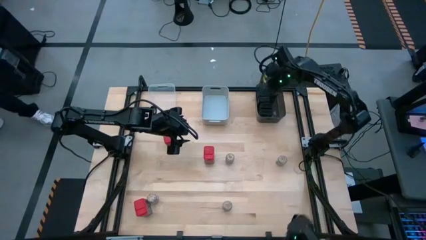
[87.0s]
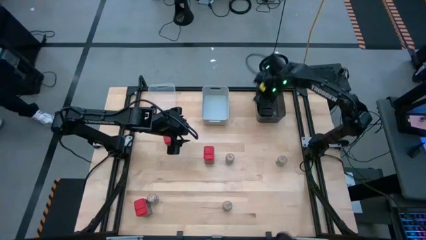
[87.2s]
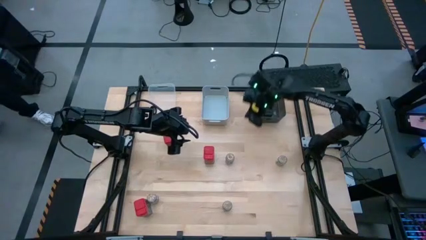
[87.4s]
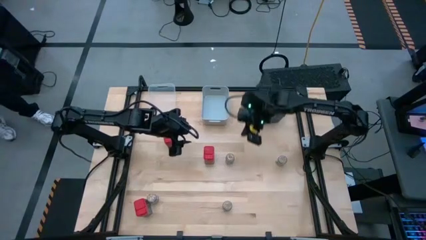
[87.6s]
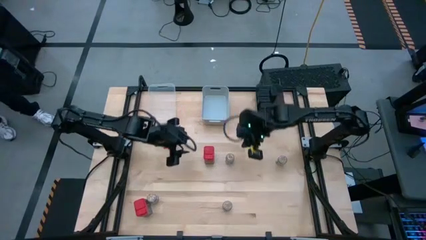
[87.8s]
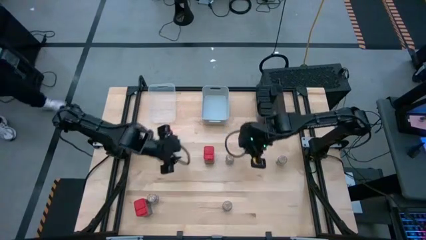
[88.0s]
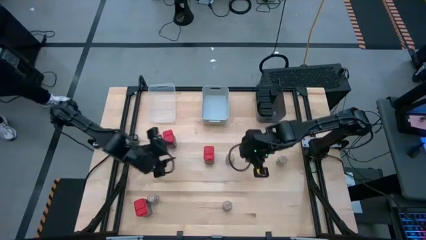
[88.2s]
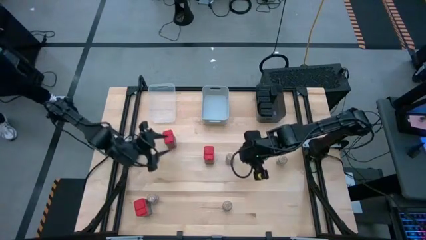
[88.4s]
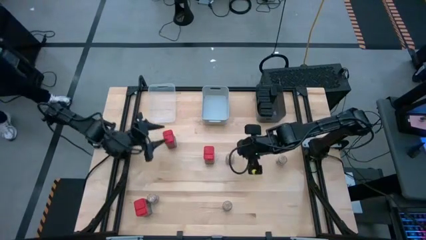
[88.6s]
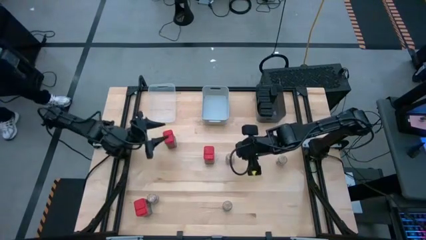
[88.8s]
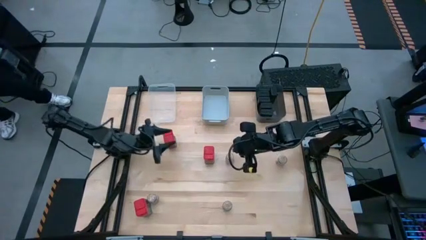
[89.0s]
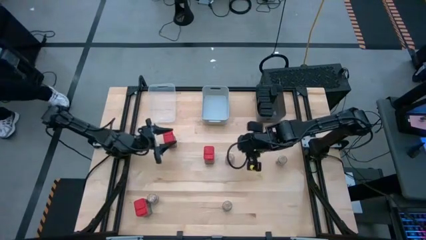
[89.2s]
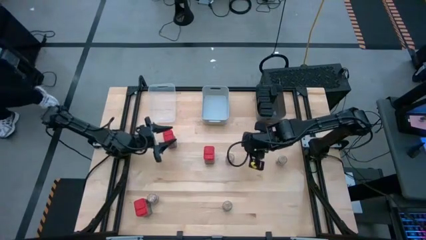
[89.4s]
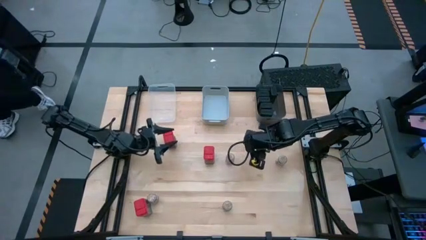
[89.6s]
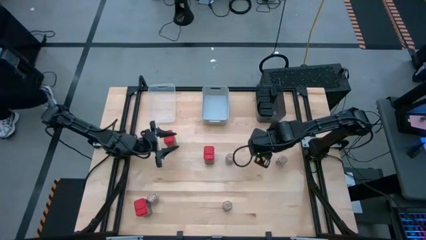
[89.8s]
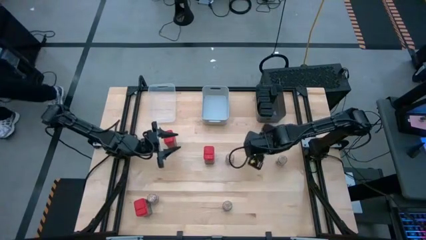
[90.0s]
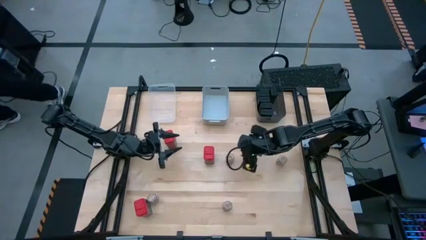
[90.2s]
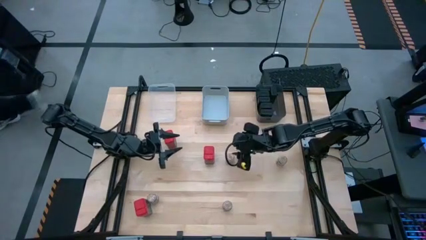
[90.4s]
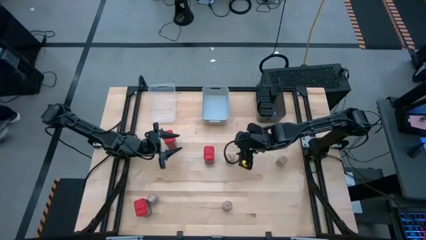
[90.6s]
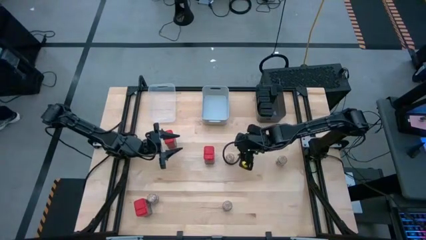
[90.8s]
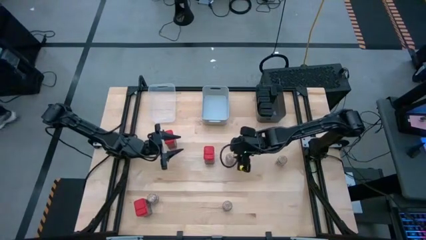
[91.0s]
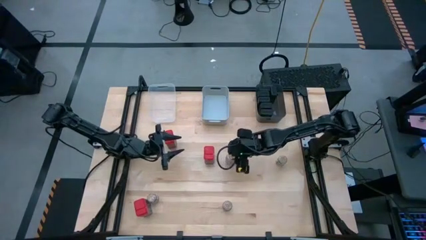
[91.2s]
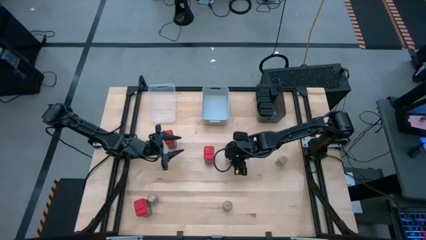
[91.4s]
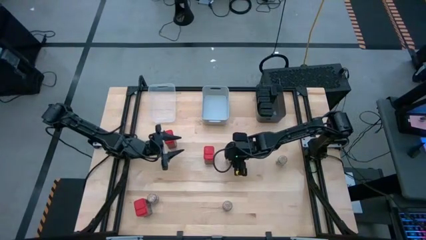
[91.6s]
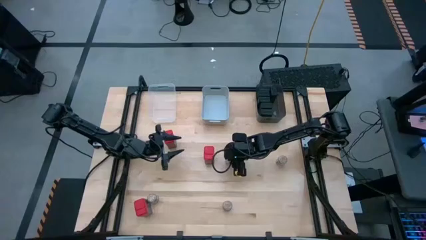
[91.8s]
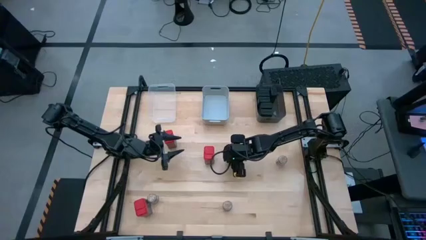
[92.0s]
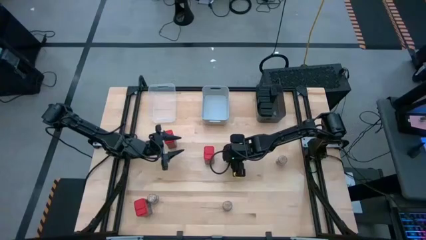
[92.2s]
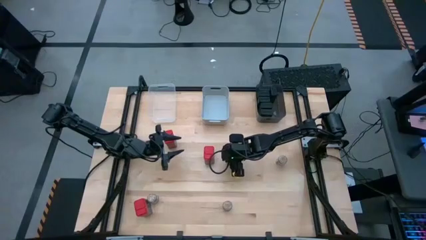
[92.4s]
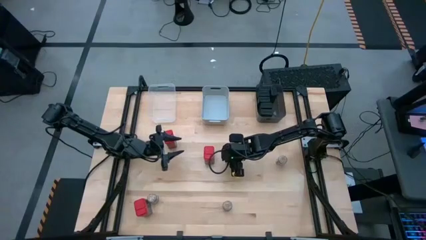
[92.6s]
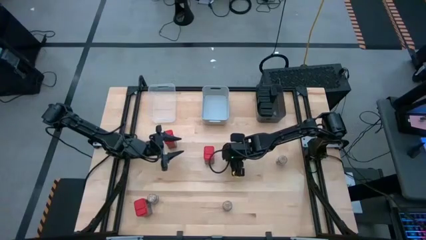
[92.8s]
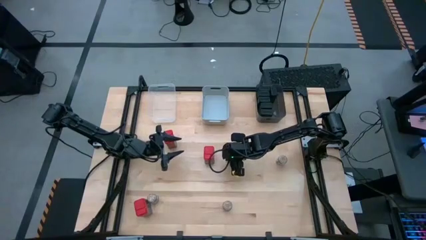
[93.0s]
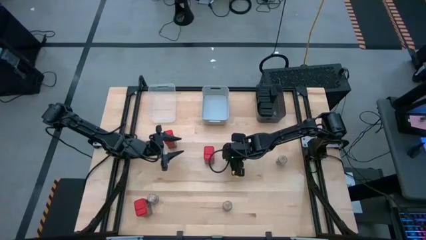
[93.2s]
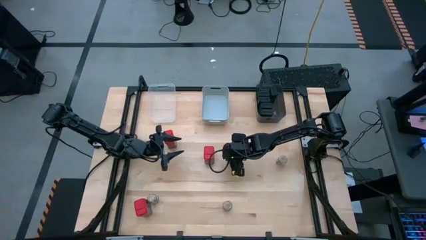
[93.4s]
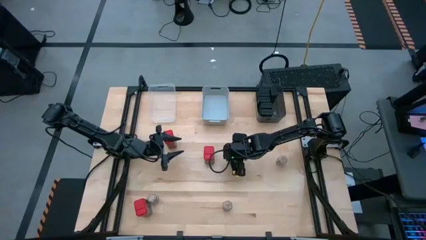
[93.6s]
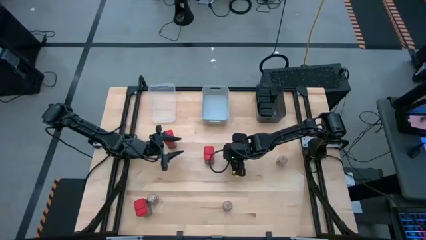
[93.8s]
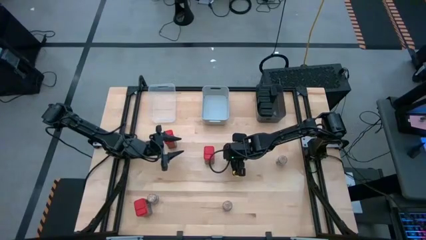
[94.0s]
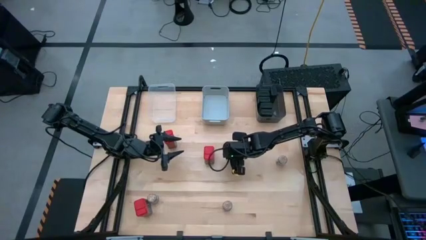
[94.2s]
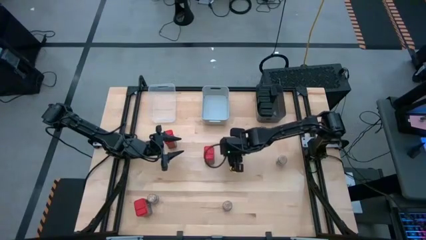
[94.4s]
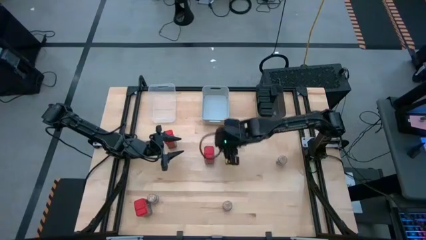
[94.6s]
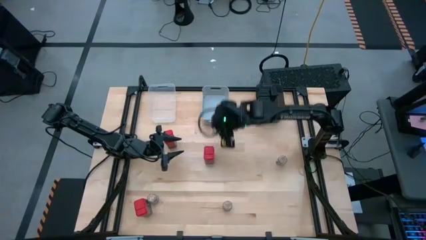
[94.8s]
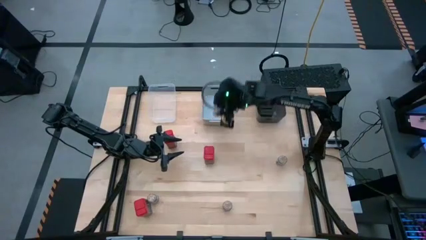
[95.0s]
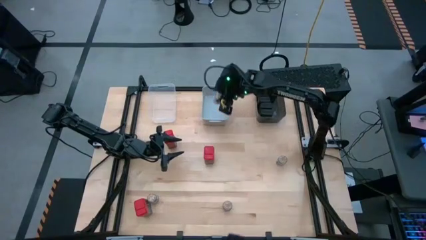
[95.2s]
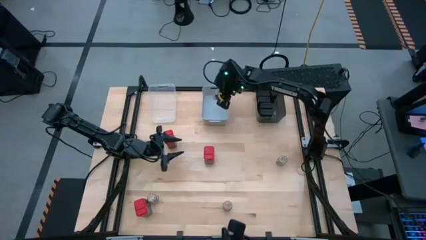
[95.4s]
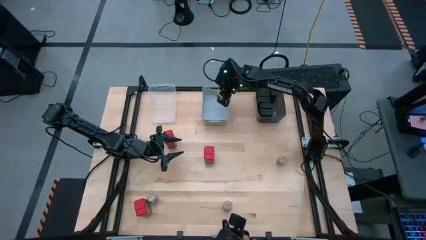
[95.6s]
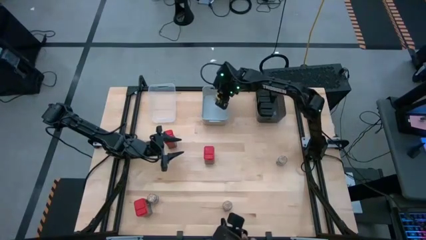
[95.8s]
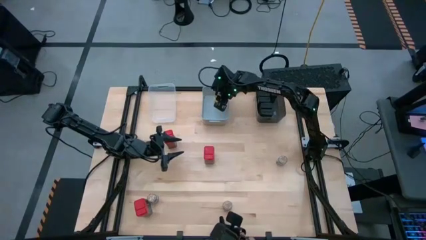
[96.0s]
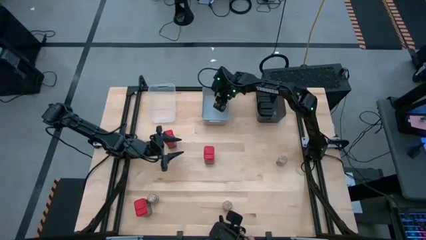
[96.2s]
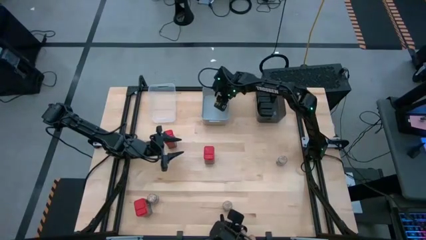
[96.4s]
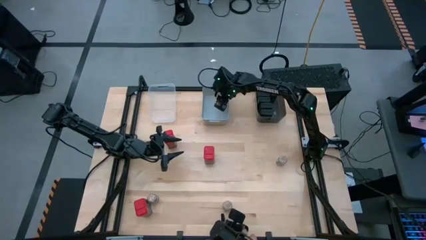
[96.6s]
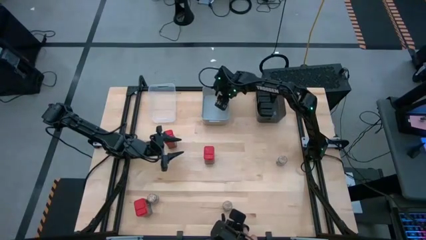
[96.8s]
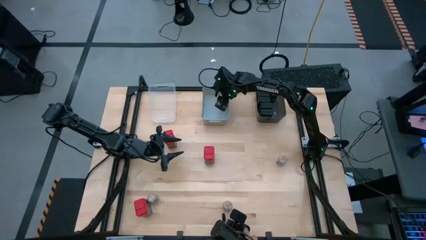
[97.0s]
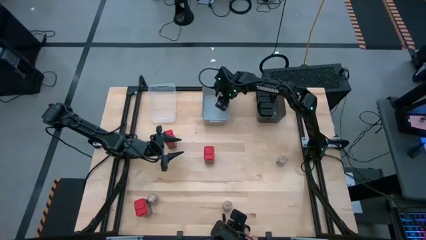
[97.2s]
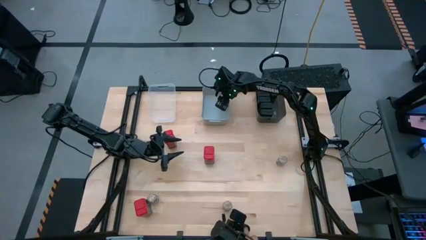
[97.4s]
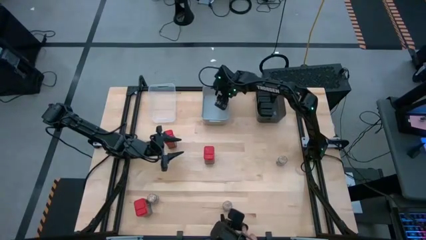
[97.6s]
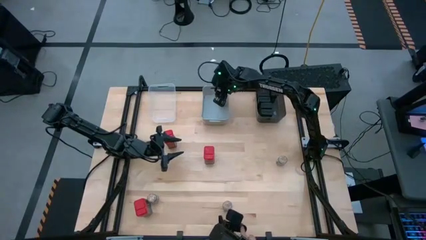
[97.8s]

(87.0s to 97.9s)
Task: Sort spices by type
Put the top left brown seasoning bottle into the light gray bin

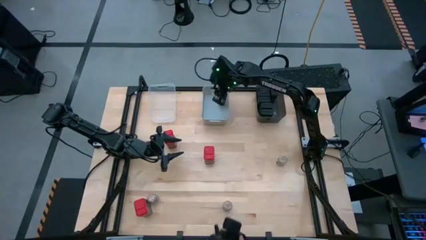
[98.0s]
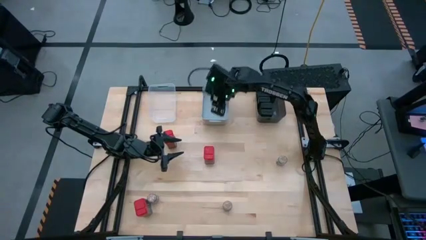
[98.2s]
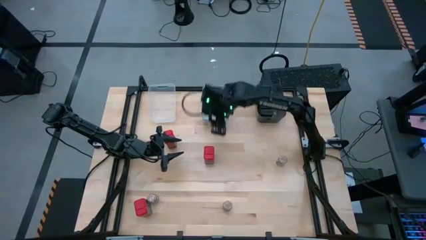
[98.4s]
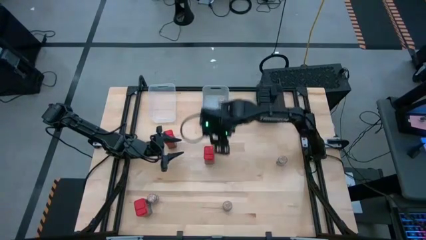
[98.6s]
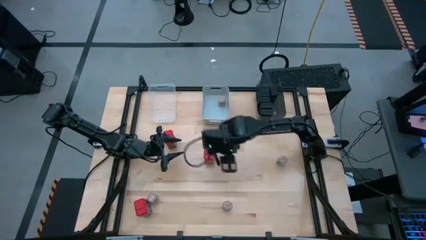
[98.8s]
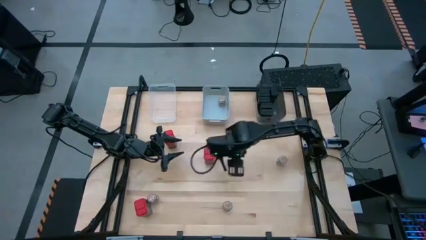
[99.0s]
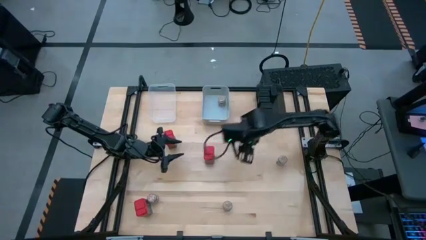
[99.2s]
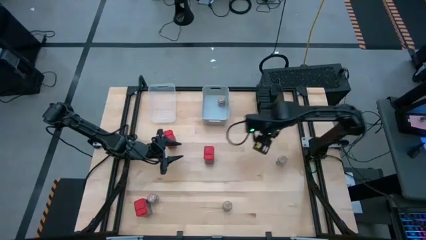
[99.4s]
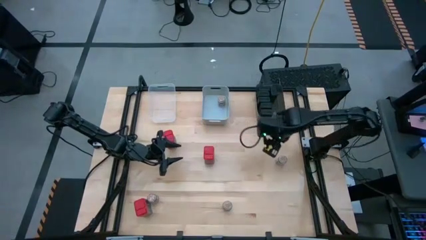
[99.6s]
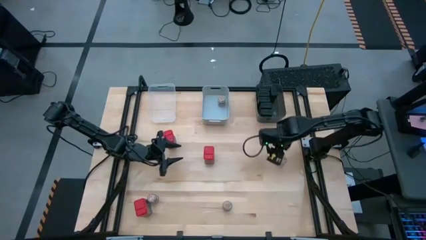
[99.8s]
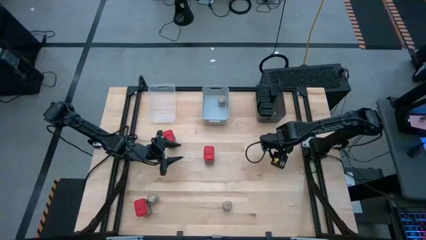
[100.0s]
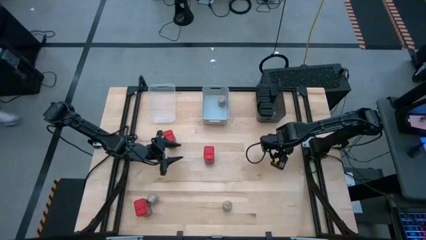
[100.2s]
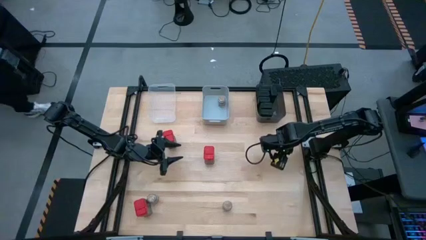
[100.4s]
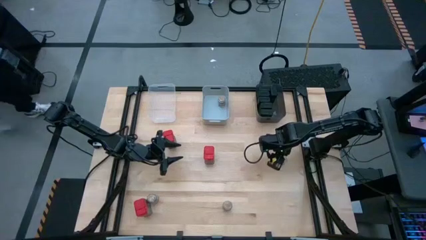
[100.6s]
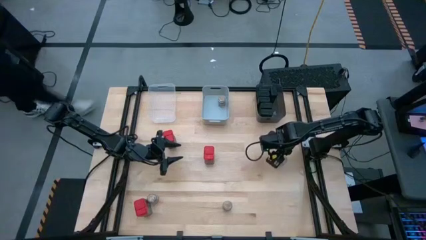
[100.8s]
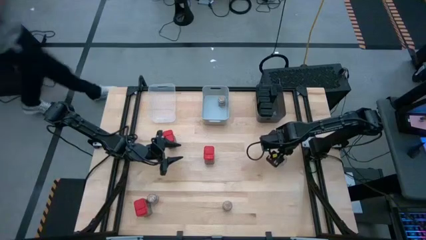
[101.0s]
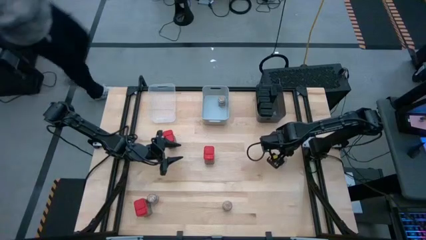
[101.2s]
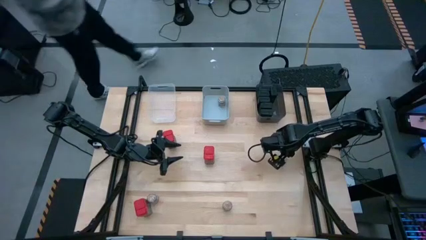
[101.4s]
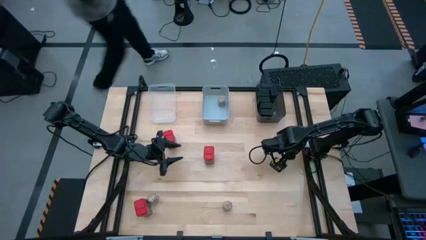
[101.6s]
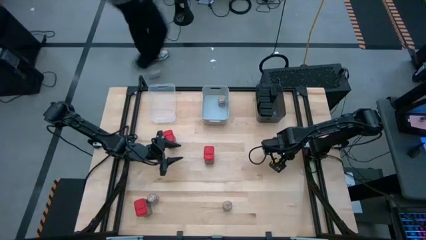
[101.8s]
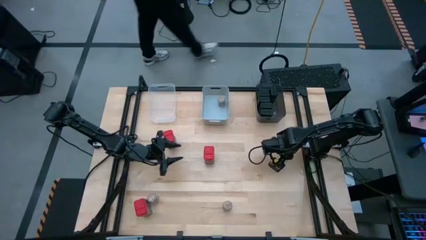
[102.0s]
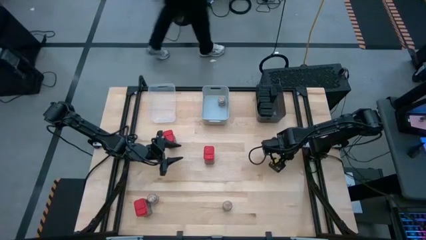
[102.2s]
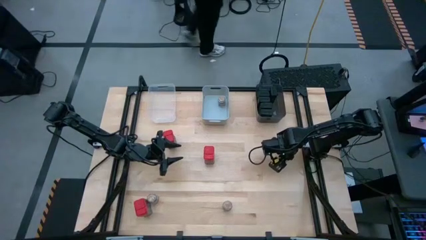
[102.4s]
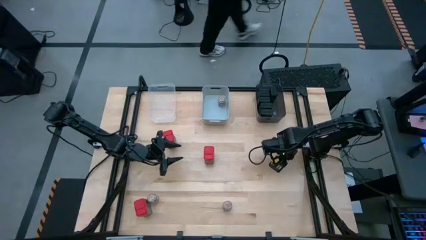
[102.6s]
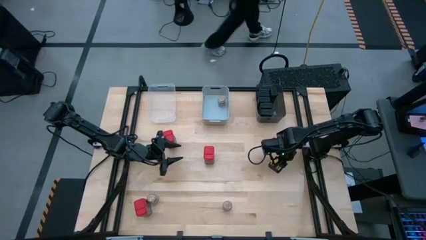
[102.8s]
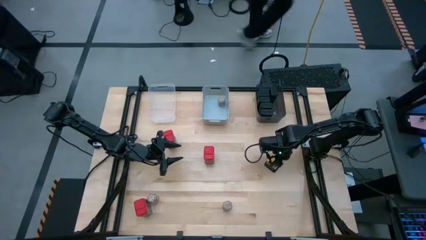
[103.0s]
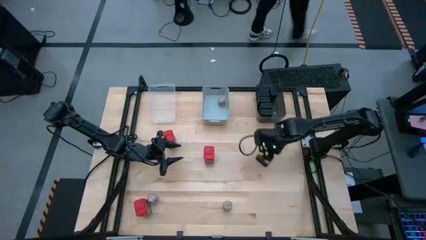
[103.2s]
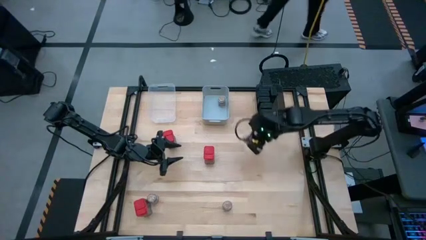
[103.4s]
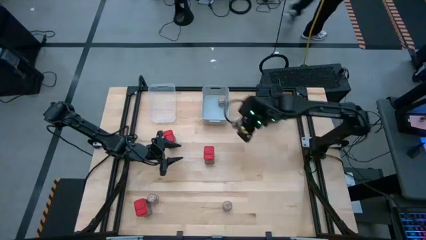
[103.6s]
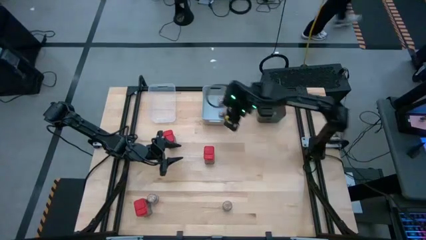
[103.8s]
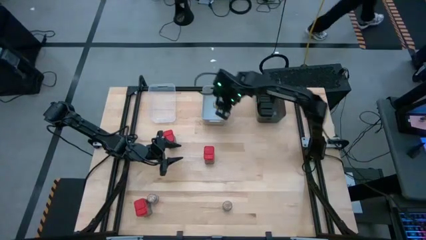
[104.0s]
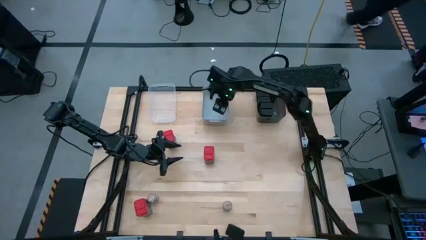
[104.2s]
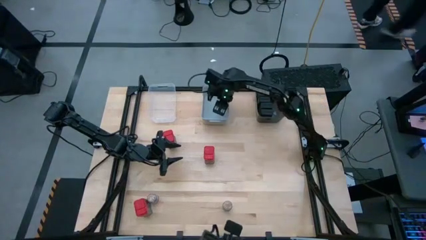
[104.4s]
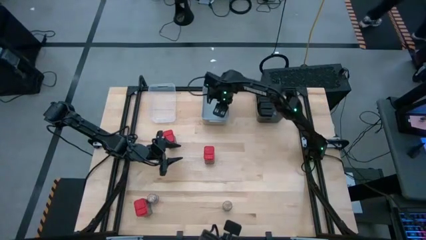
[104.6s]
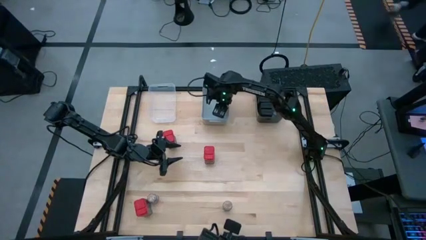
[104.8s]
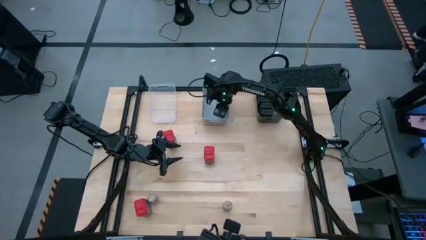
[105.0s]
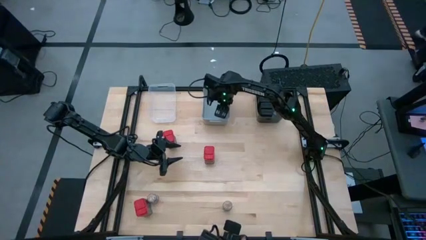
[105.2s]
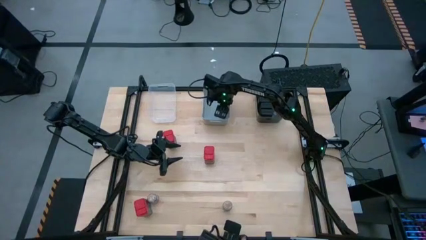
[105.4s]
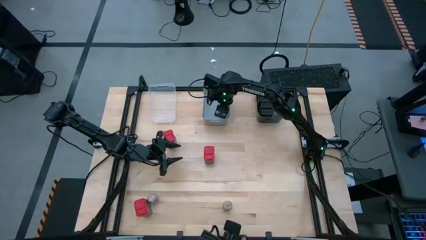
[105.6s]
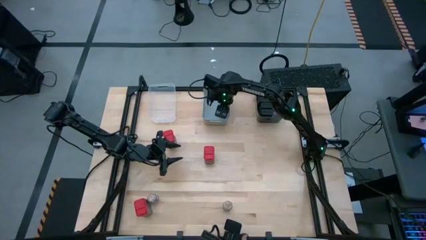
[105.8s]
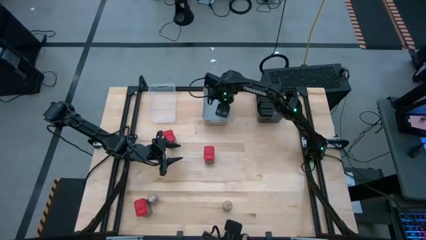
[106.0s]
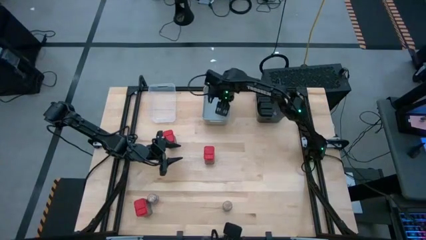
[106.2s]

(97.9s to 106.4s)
Put the right brown seasoning bottle into the light gray bin
